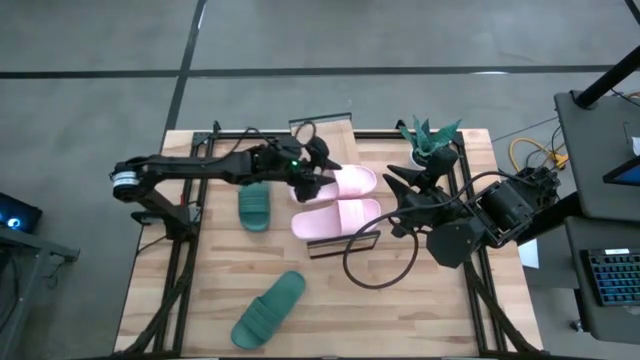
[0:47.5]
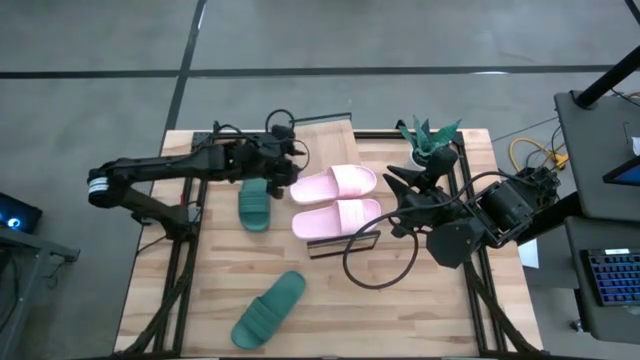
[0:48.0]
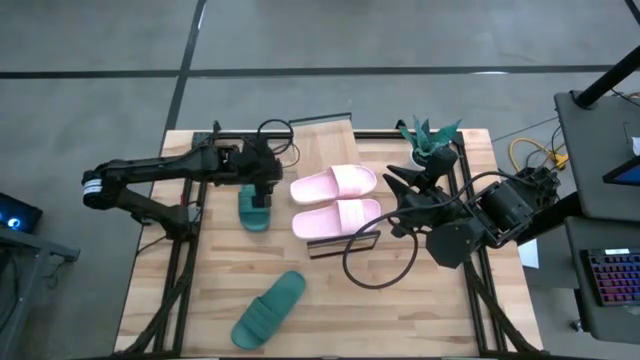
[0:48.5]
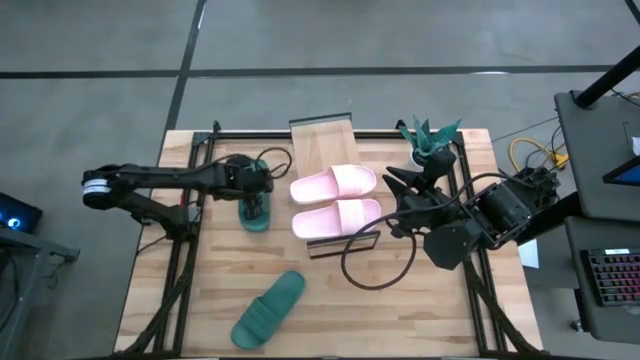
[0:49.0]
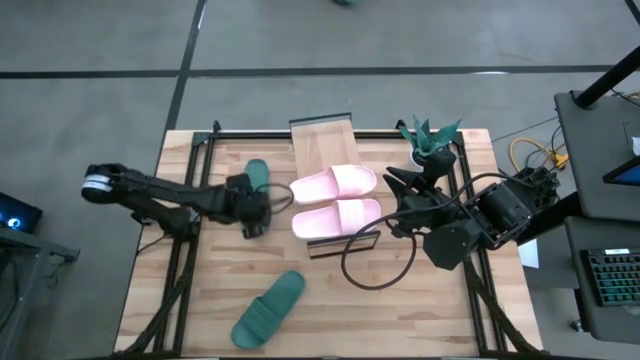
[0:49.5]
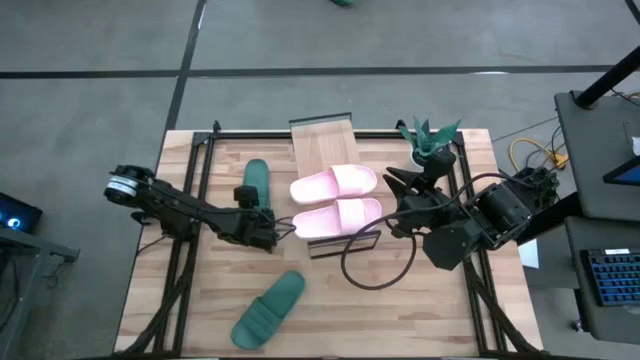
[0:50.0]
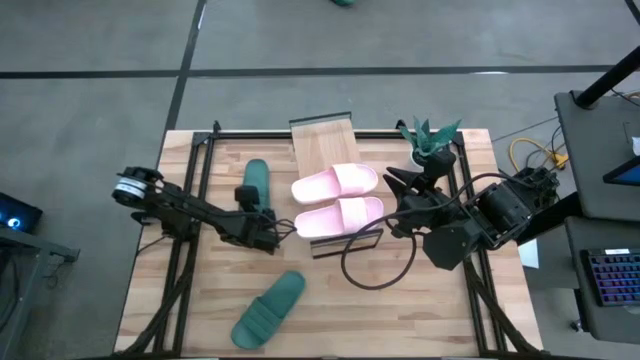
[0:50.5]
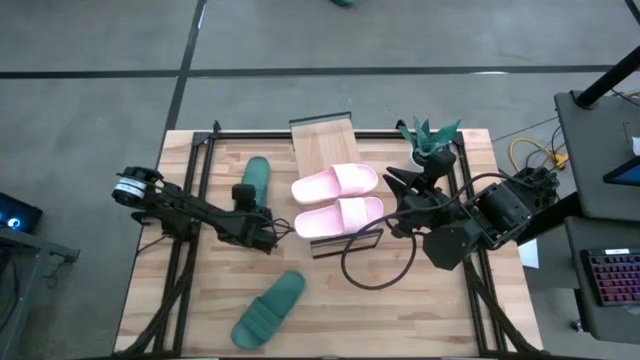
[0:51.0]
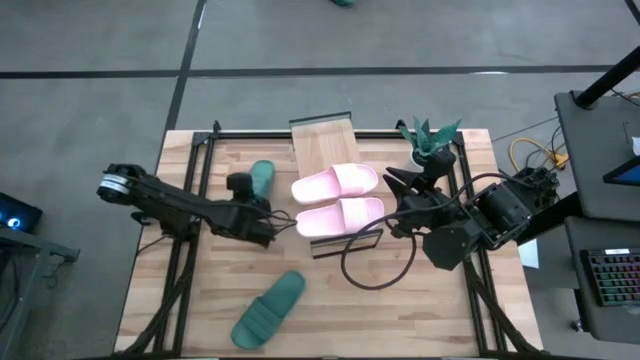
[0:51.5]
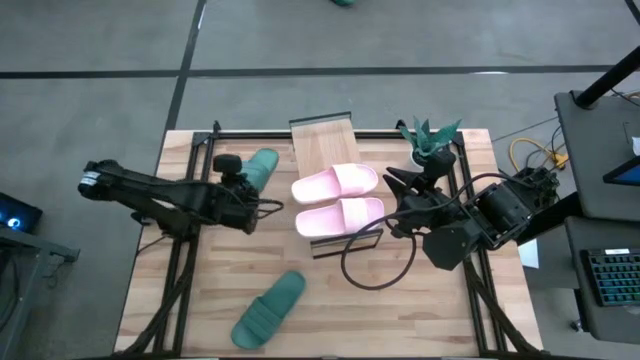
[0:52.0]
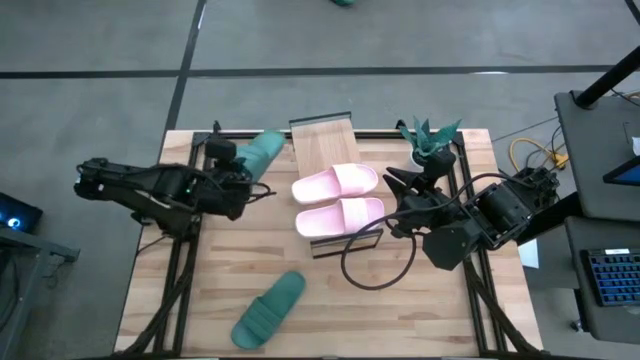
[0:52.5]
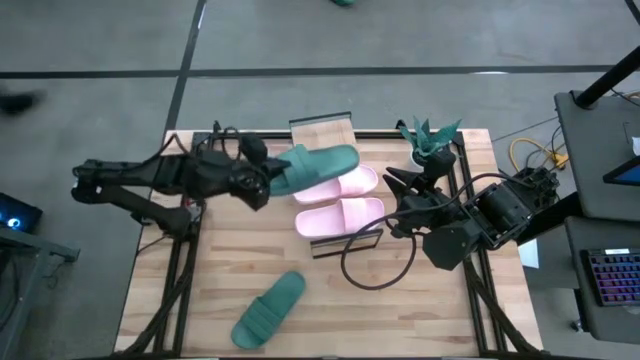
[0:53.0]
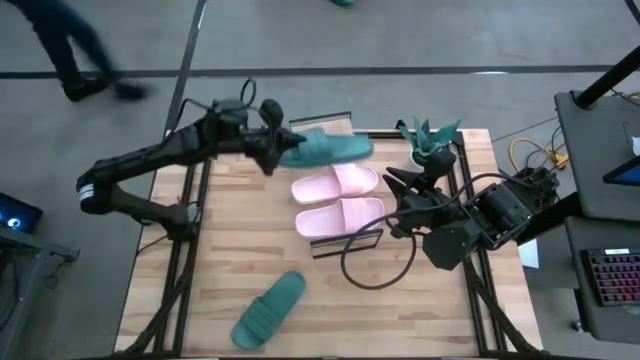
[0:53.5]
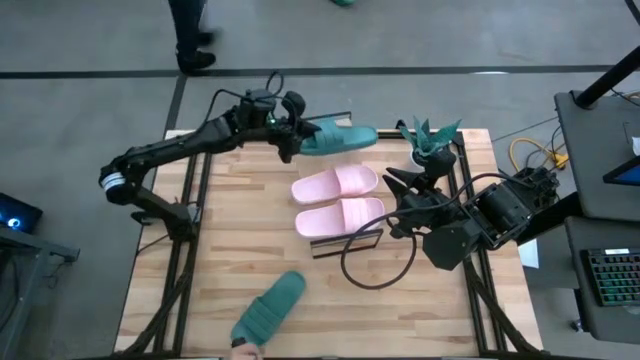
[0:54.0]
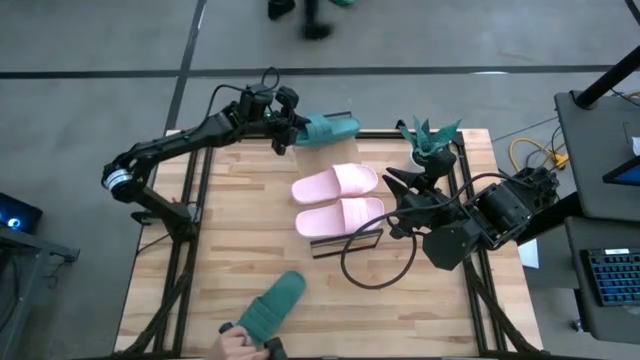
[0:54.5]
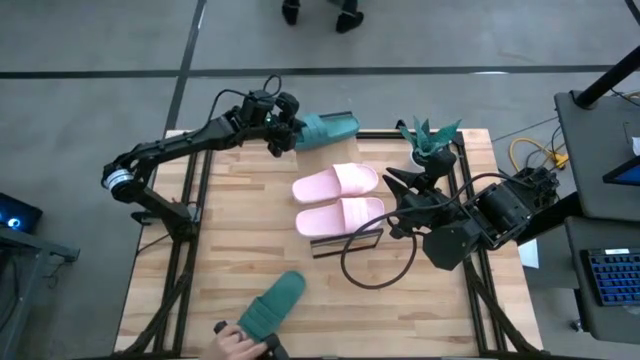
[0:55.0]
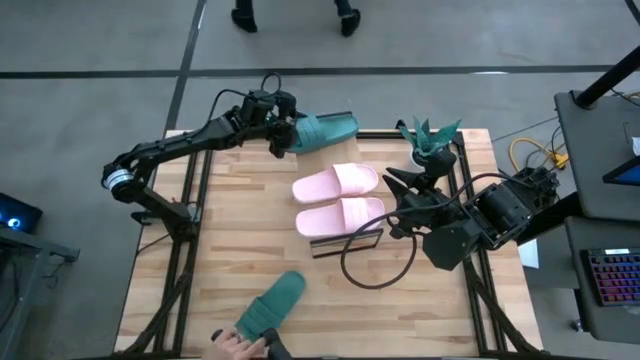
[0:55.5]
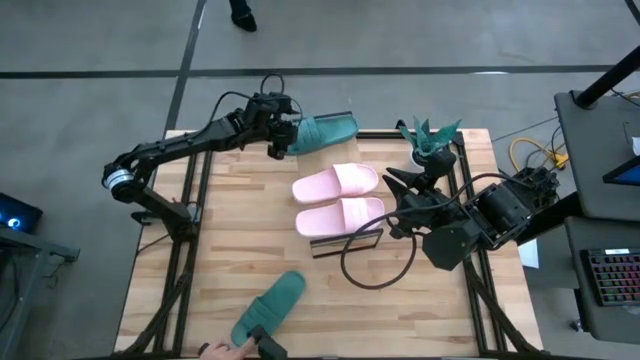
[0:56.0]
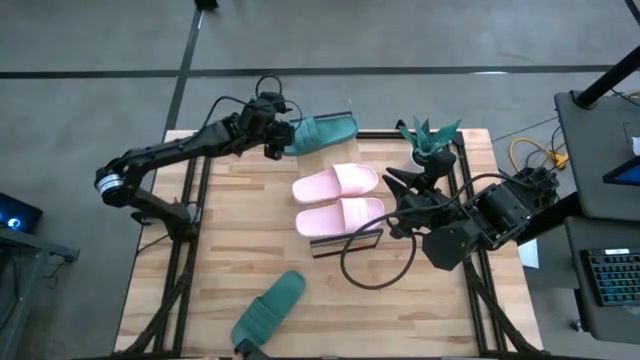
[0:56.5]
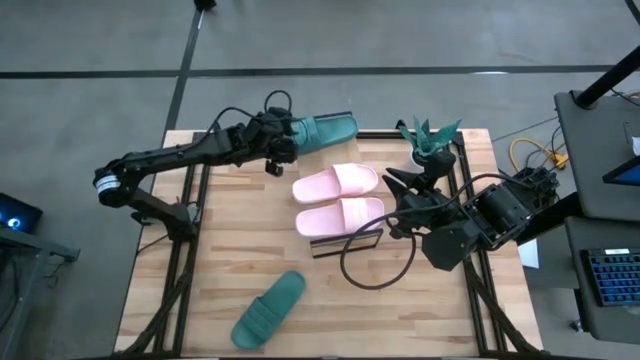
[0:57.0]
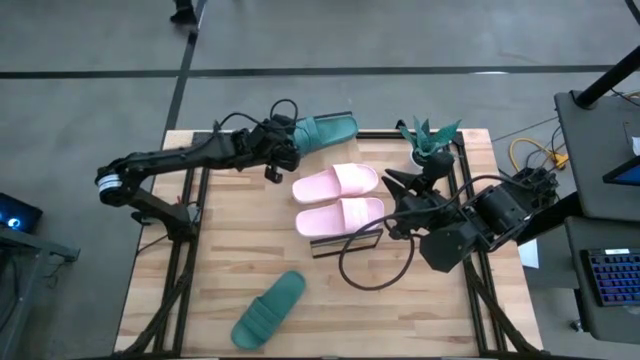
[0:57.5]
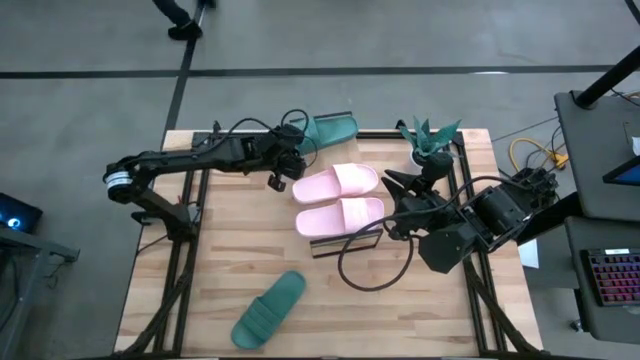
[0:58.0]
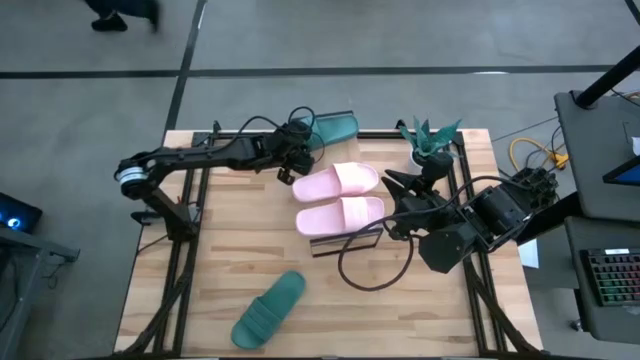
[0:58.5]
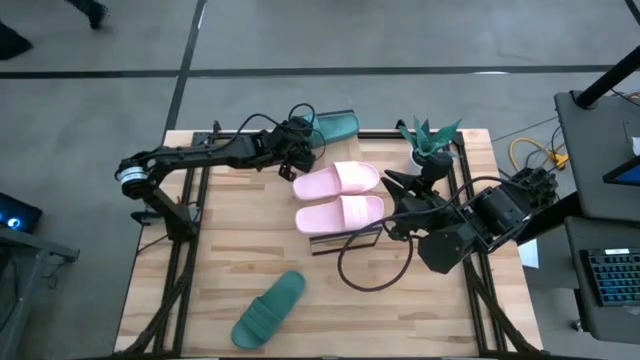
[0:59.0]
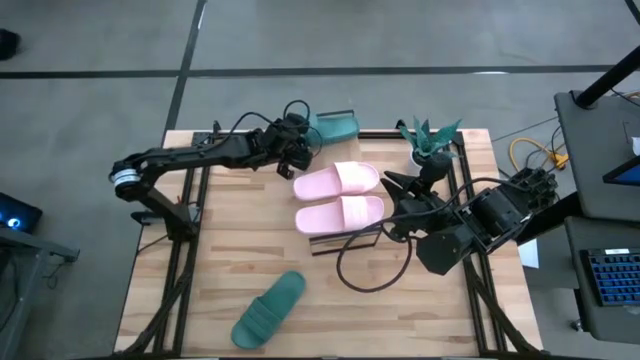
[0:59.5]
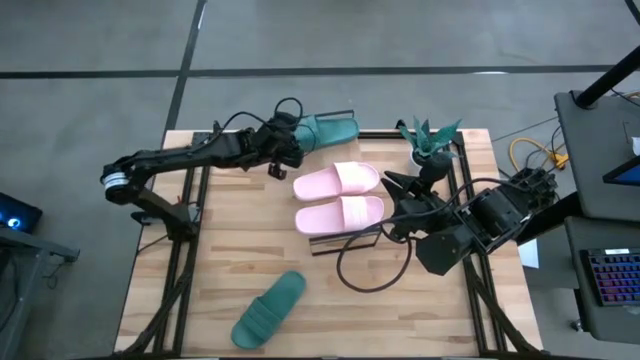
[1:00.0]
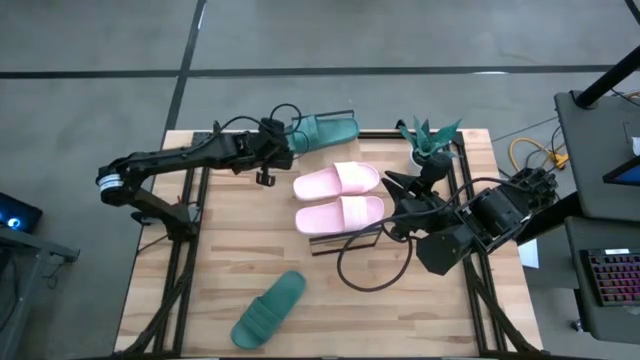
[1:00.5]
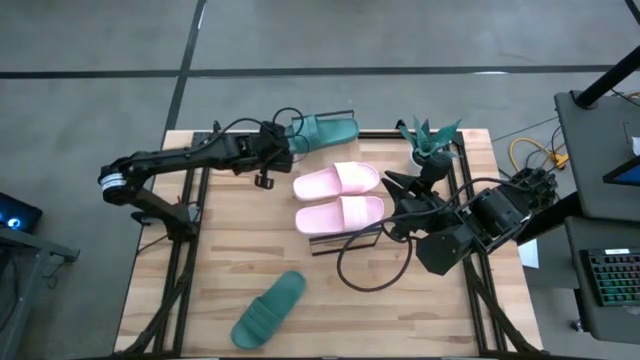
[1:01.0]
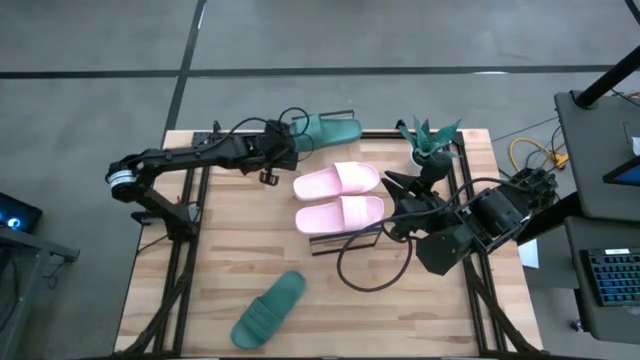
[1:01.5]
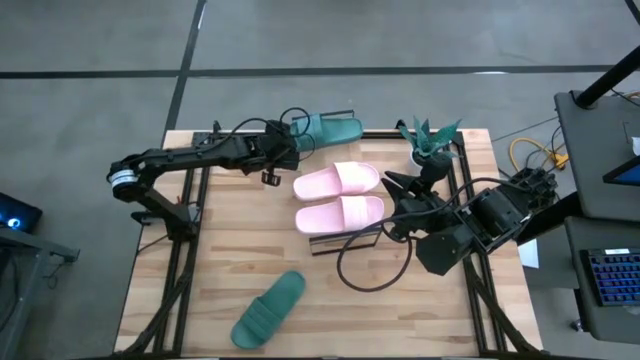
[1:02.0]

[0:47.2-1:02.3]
Task: Pick and place slides into the shelf
Put the top green slide on the shelf

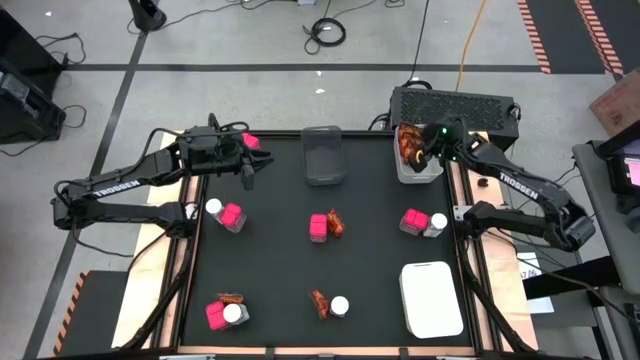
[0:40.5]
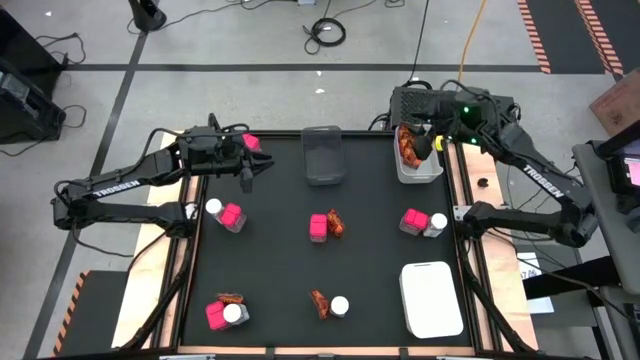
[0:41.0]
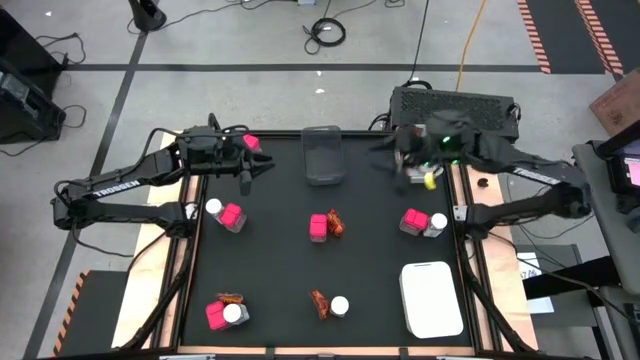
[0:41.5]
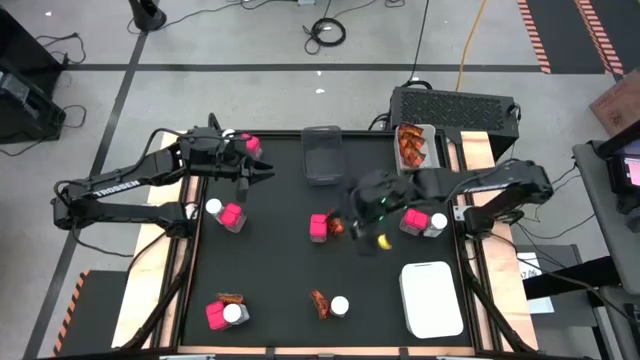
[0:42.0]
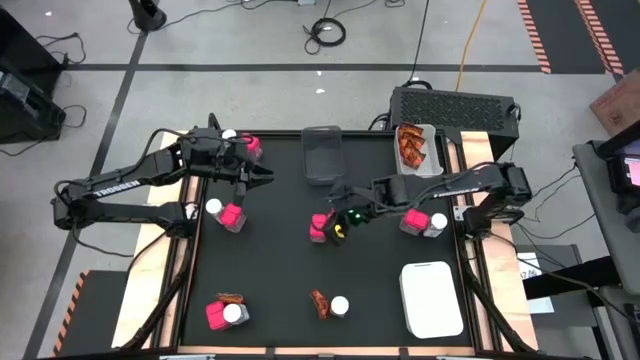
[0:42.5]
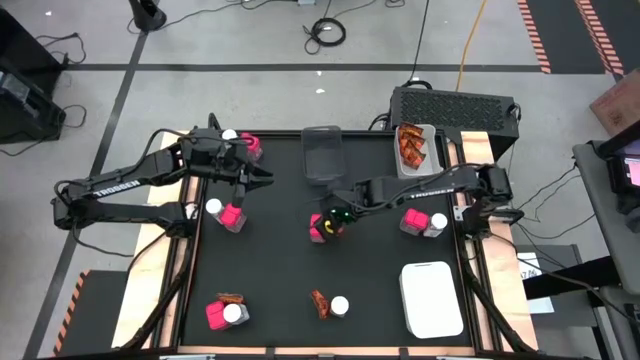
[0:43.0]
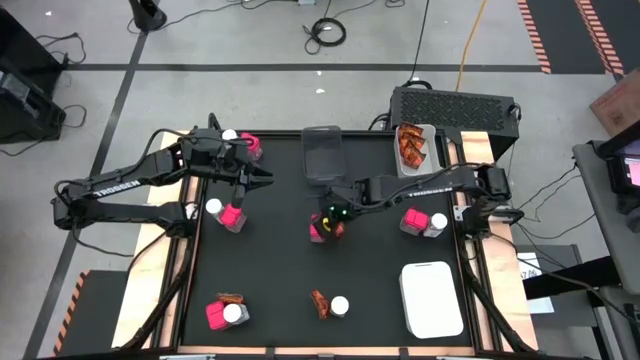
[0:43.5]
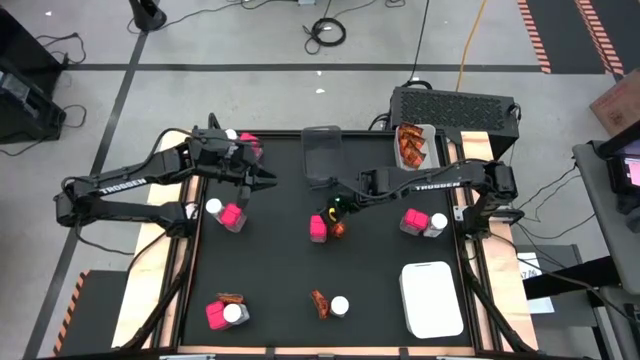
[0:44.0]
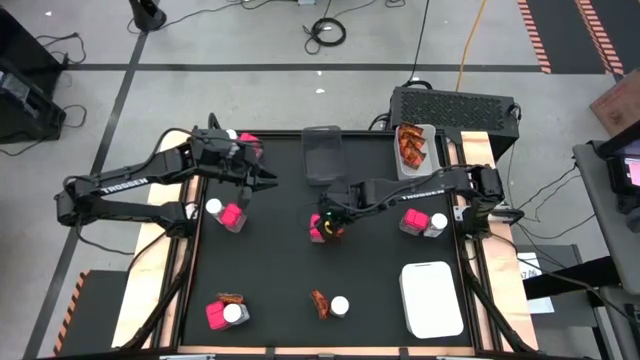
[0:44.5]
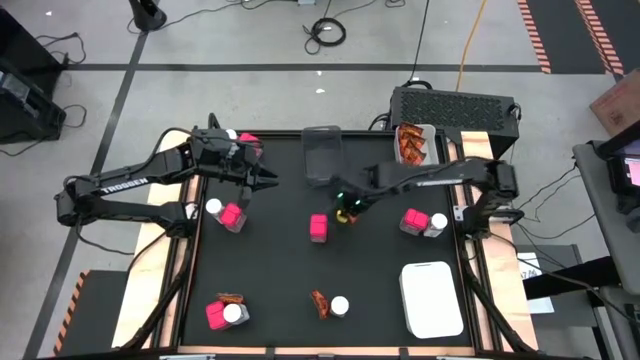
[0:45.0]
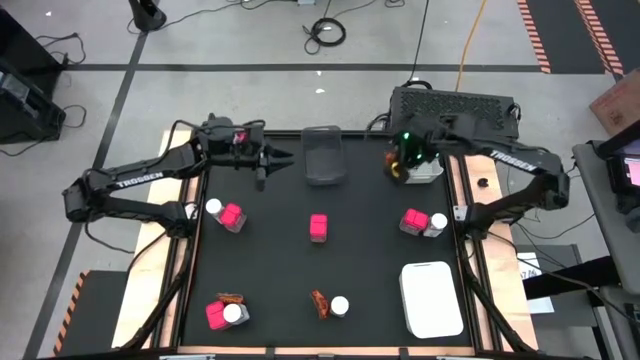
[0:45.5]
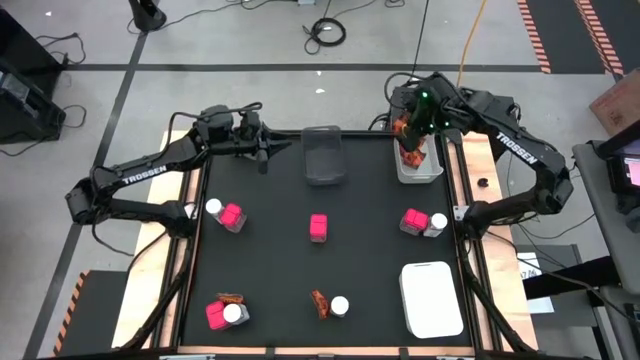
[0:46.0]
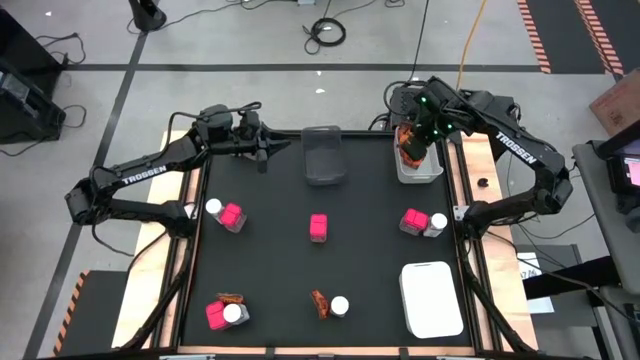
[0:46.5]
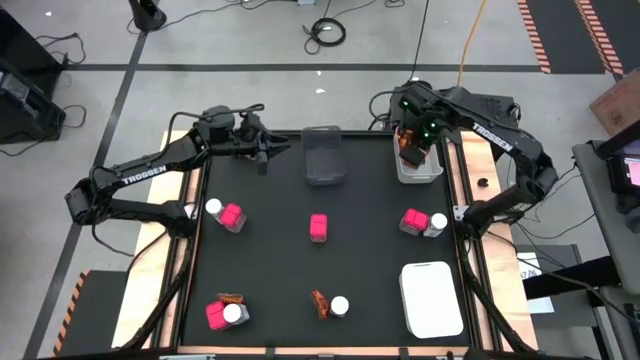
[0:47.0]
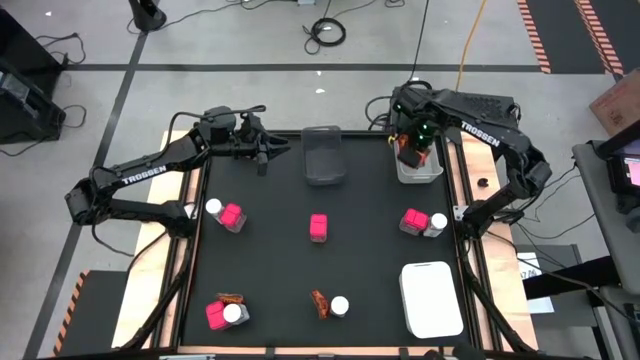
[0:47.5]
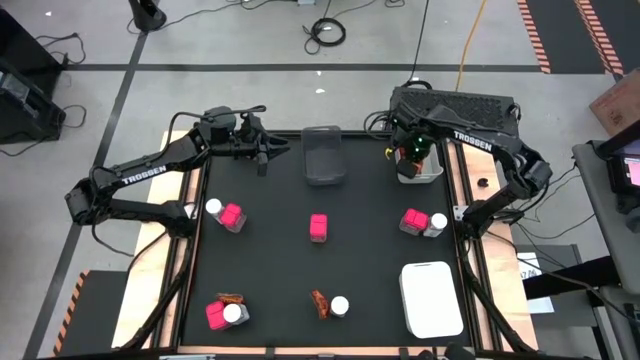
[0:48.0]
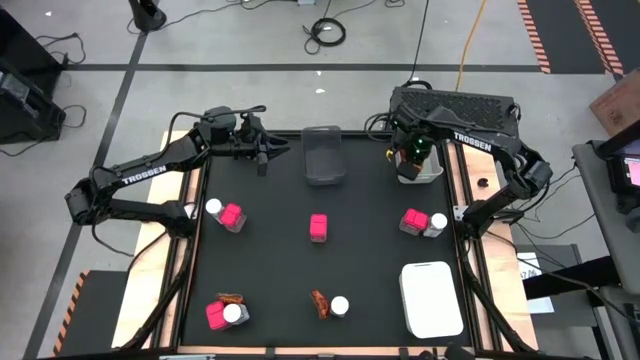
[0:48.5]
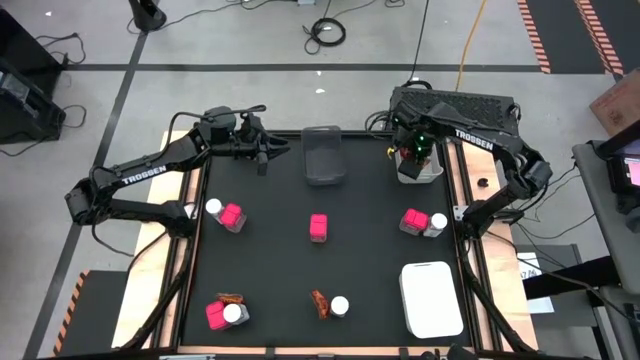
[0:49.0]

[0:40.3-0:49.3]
Task: Sort spices by type
Put the orange seasoning pack into the top white bin
